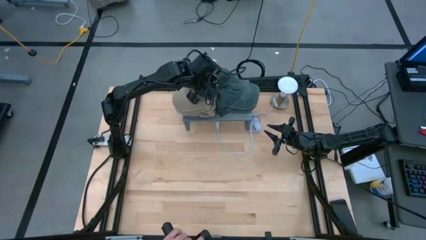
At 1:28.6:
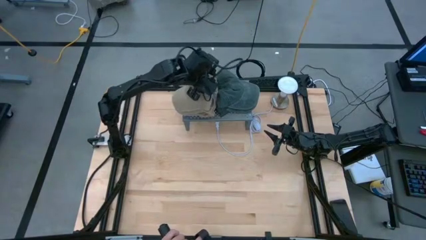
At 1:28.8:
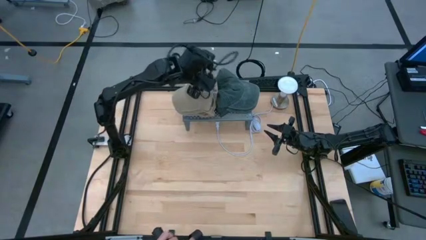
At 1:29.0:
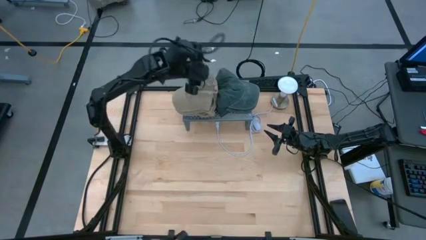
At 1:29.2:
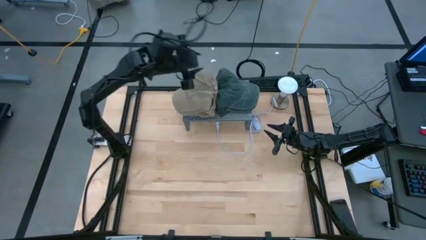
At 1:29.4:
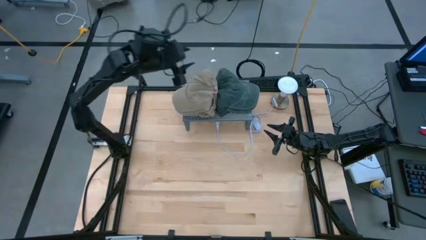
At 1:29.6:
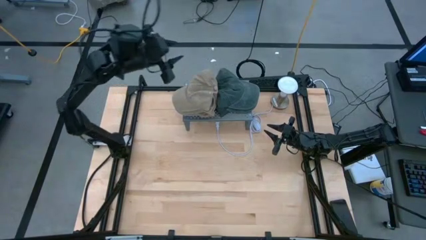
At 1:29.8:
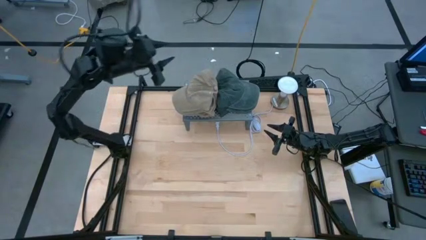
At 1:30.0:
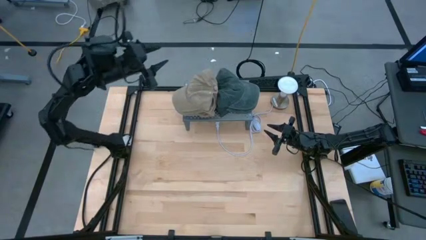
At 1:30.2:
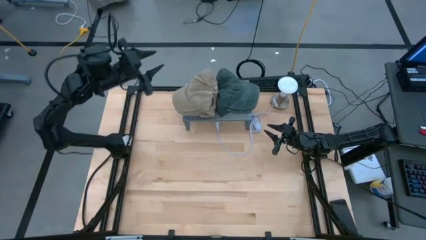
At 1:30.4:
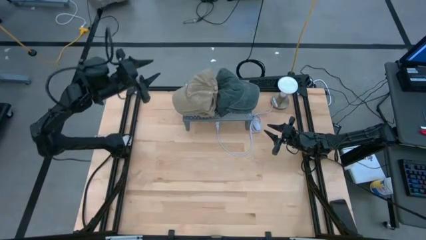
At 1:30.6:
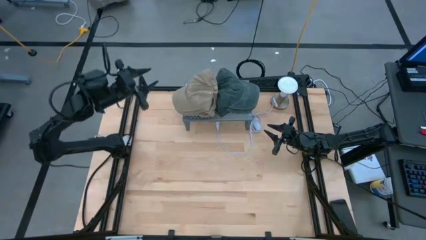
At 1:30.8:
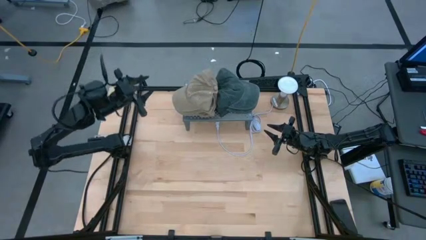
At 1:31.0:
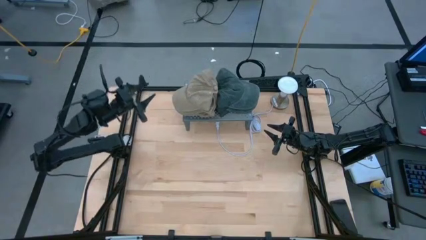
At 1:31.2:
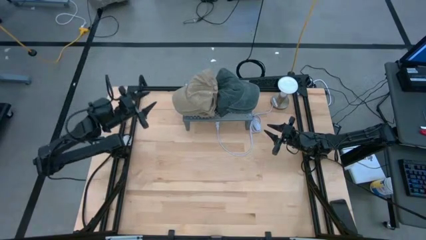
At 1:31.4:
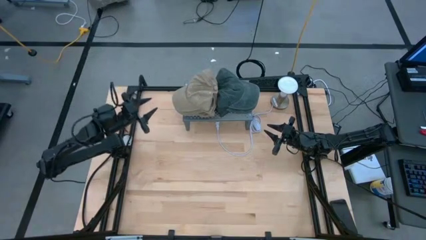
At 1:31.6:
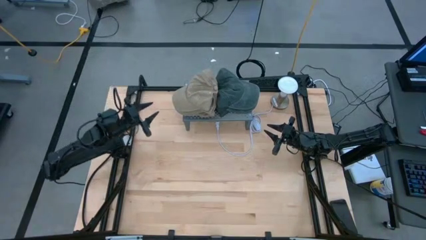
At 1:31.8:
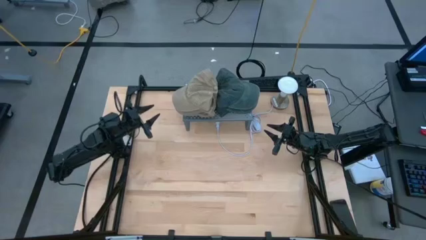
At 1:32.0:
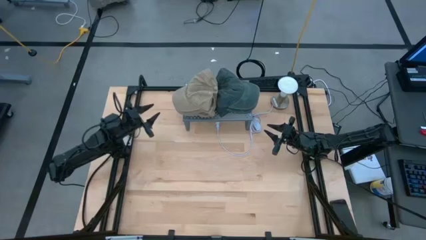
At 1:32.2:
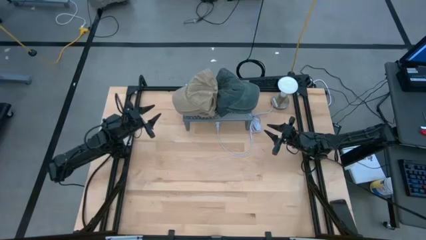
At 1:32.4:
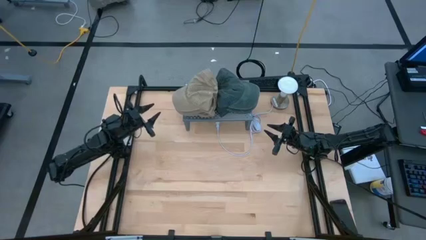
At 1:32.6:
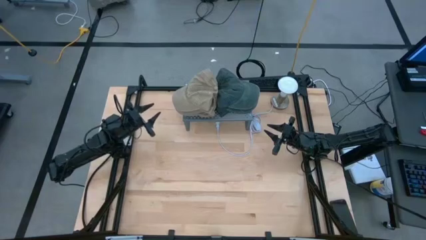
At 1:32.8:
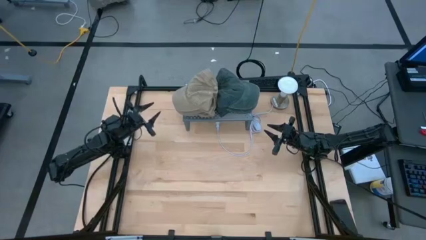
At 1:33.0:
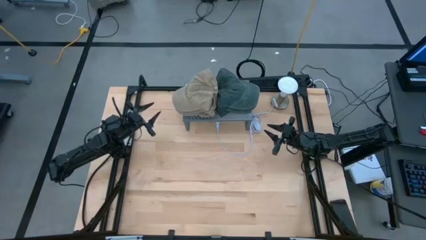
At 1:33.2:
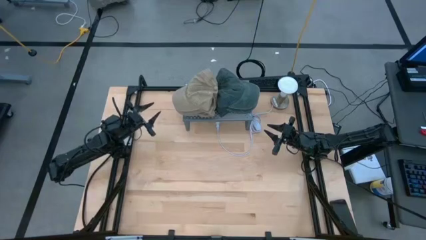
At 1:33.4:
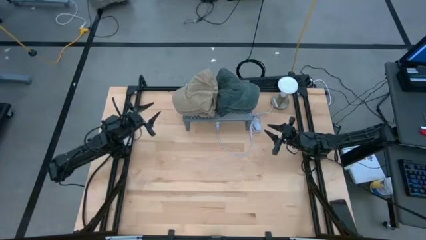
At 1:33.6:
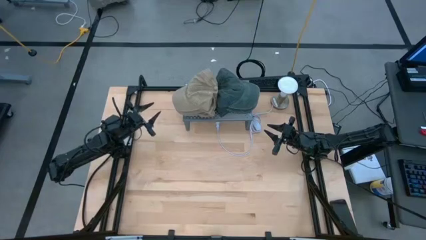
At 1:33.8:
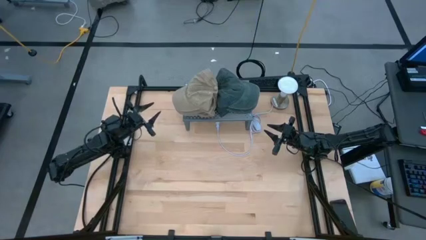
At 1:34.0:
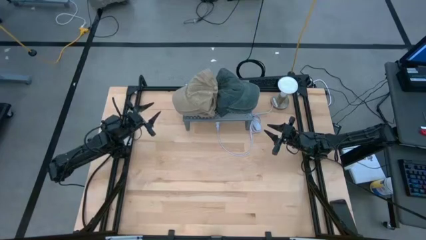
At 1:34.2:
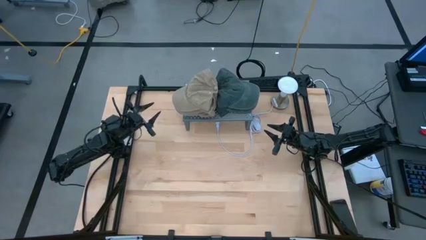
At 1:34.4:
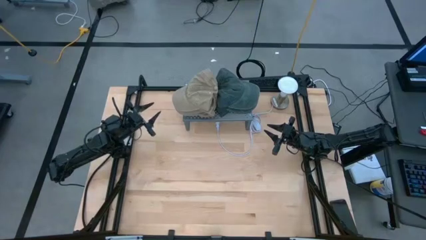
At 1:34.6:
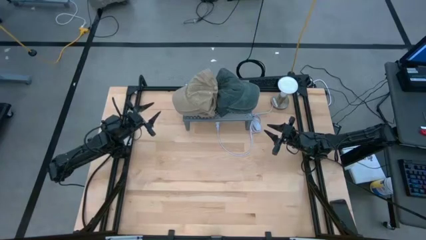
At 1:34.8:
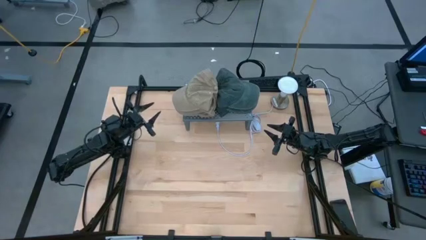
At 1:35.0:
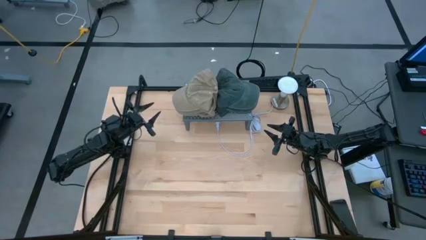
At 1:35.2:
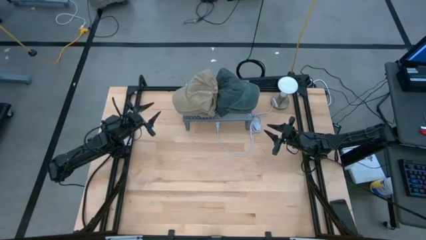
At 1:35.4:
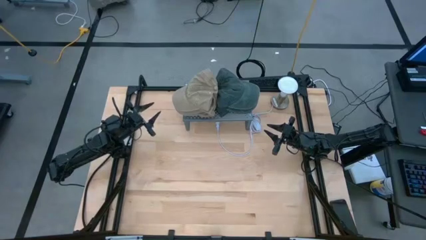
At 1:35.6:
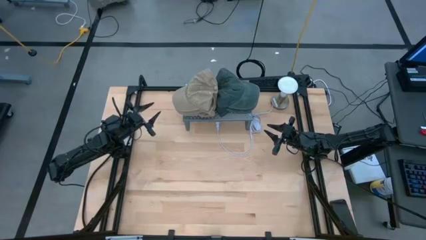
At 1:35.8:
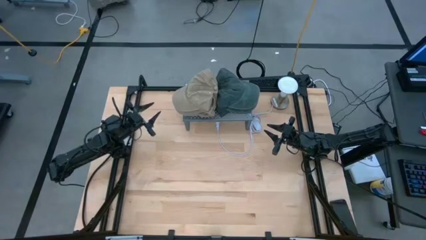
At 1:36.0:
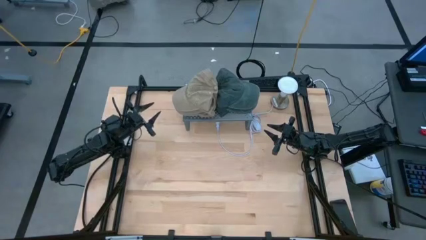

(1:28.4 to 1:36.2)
Task: Pick & Place hat
Return to Home Position

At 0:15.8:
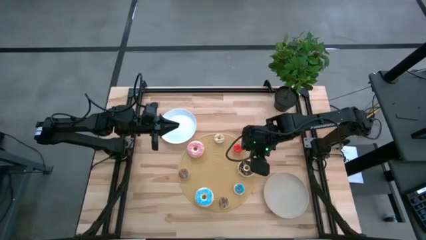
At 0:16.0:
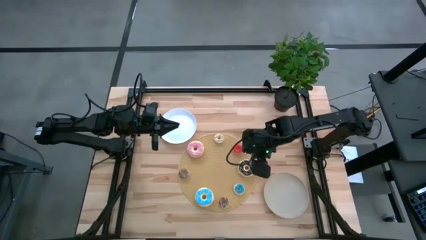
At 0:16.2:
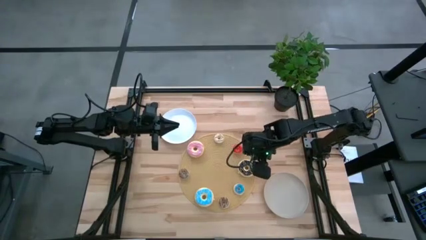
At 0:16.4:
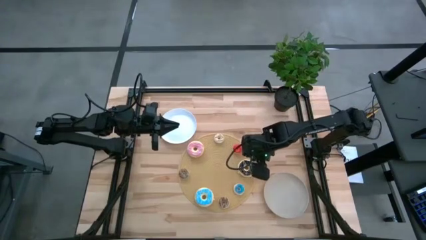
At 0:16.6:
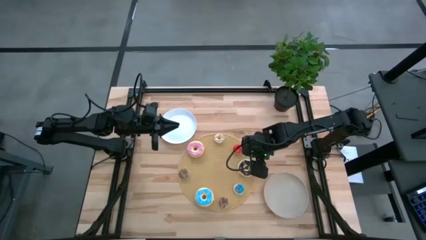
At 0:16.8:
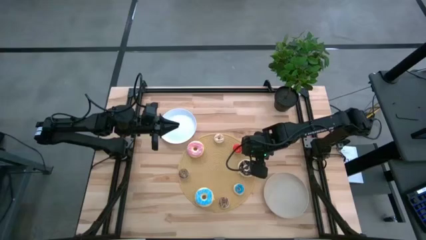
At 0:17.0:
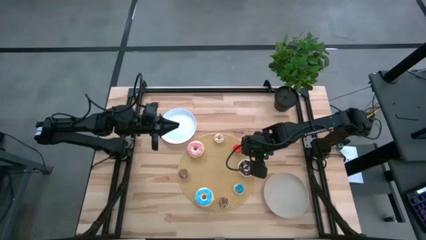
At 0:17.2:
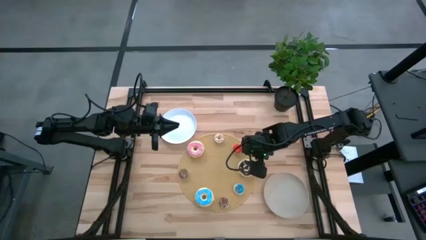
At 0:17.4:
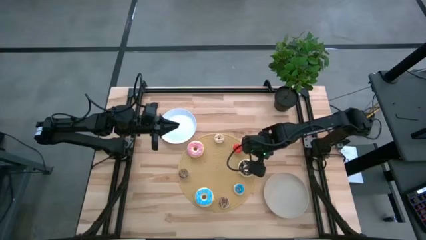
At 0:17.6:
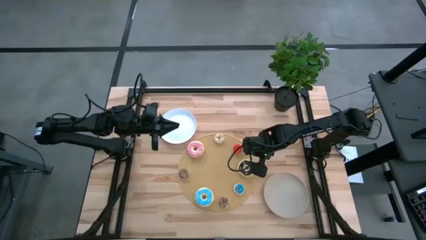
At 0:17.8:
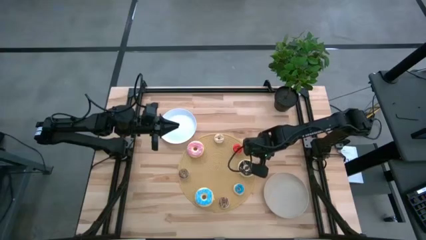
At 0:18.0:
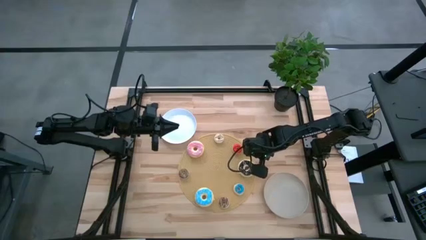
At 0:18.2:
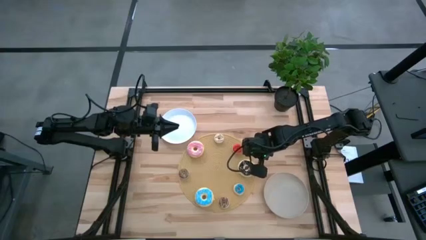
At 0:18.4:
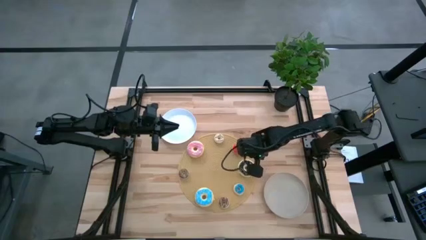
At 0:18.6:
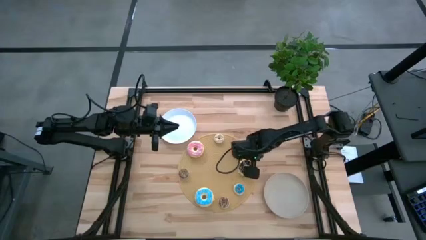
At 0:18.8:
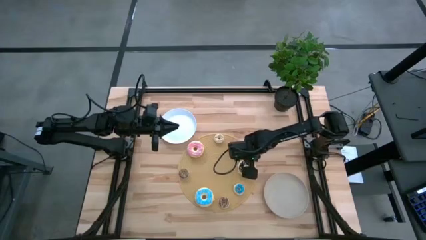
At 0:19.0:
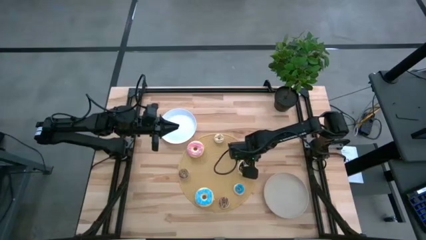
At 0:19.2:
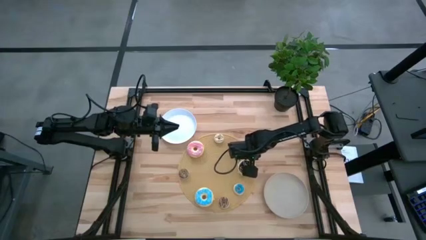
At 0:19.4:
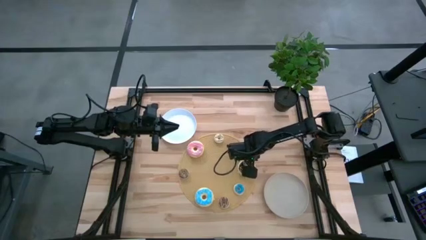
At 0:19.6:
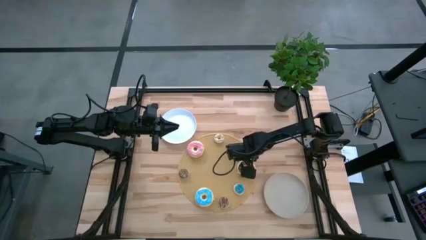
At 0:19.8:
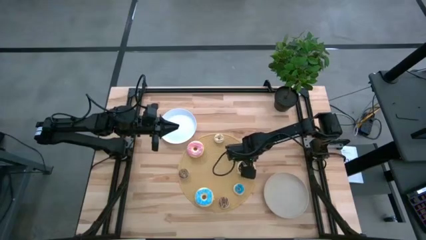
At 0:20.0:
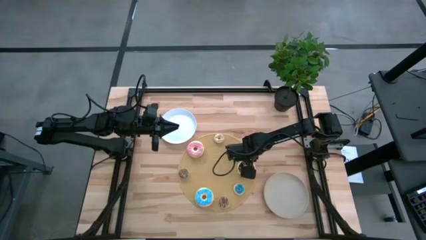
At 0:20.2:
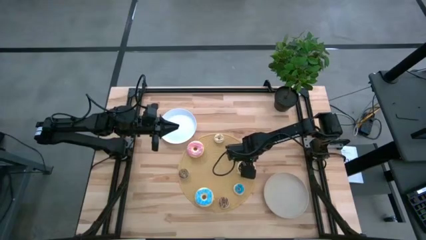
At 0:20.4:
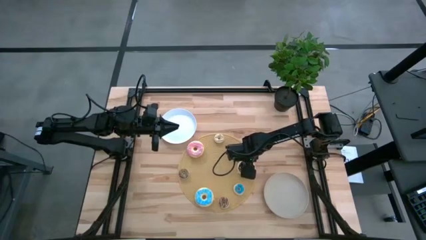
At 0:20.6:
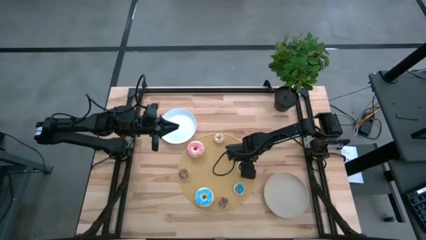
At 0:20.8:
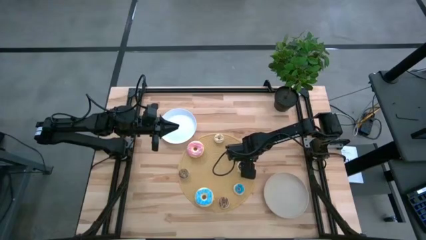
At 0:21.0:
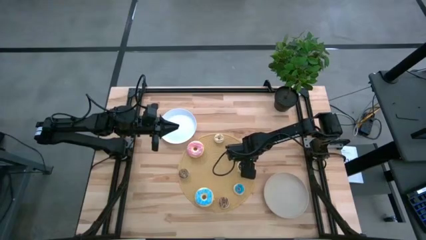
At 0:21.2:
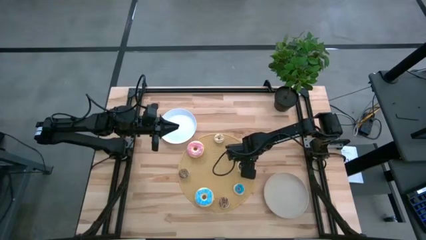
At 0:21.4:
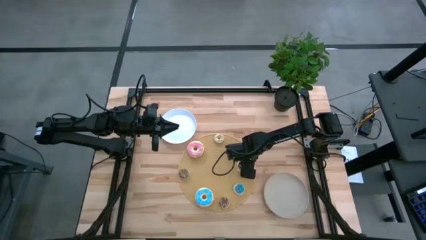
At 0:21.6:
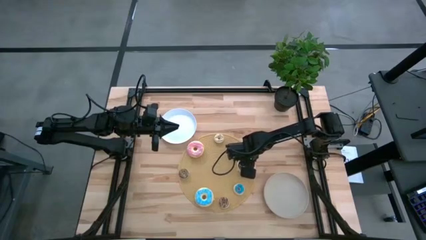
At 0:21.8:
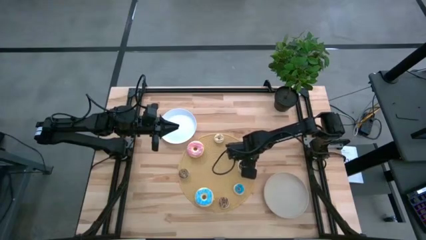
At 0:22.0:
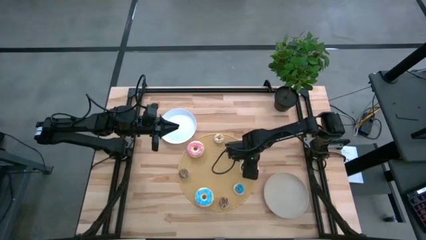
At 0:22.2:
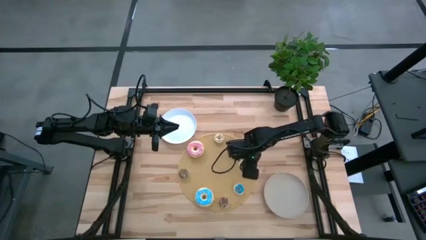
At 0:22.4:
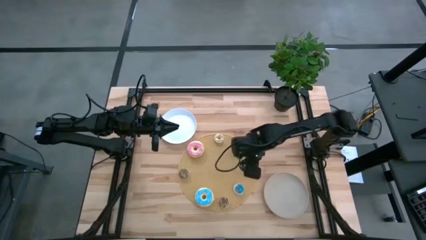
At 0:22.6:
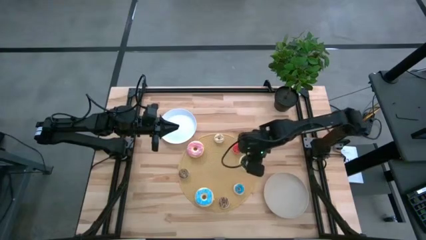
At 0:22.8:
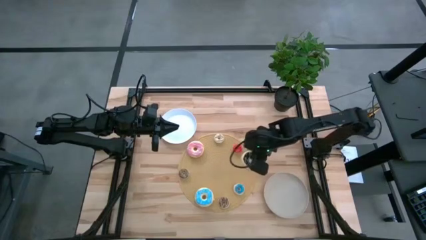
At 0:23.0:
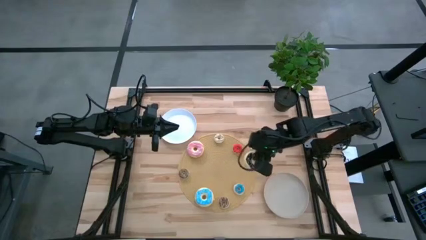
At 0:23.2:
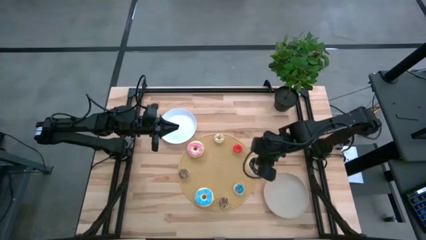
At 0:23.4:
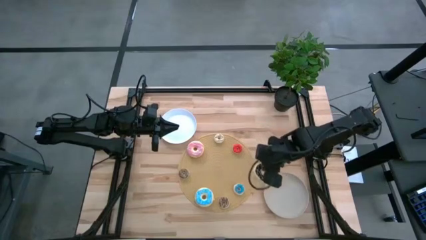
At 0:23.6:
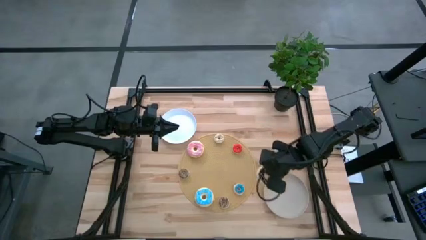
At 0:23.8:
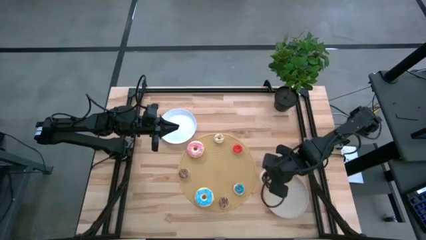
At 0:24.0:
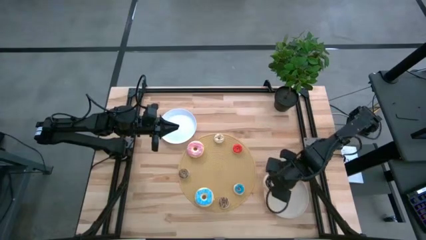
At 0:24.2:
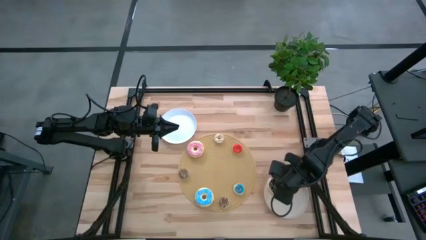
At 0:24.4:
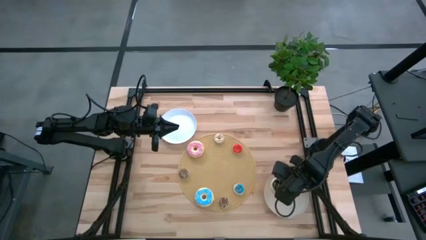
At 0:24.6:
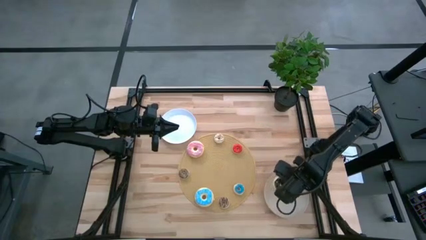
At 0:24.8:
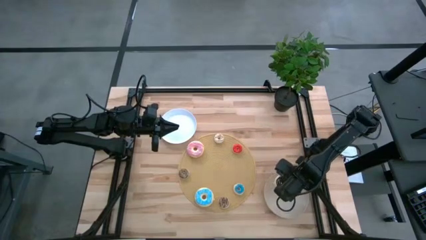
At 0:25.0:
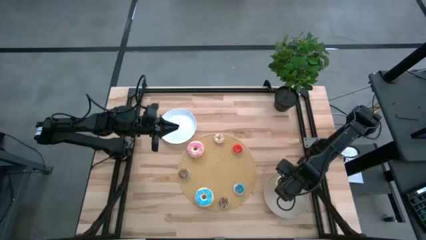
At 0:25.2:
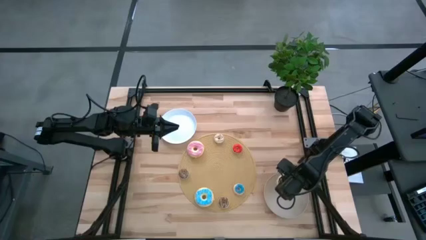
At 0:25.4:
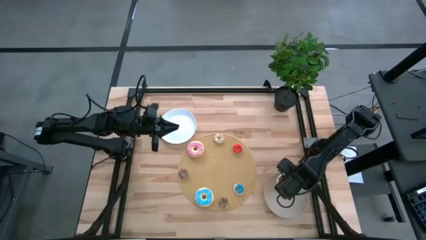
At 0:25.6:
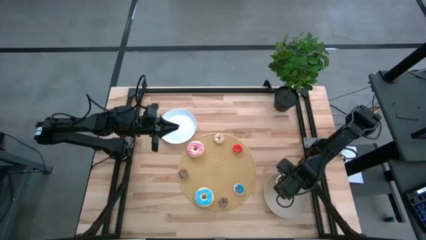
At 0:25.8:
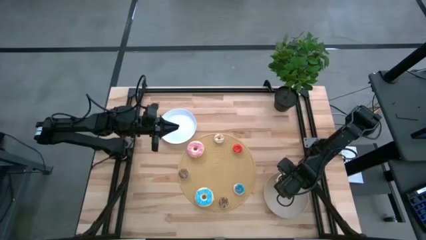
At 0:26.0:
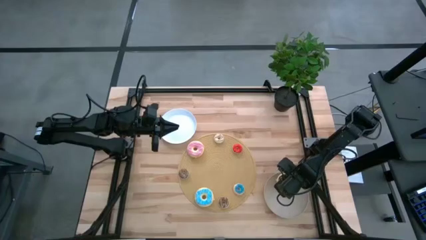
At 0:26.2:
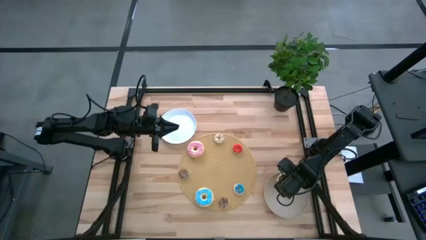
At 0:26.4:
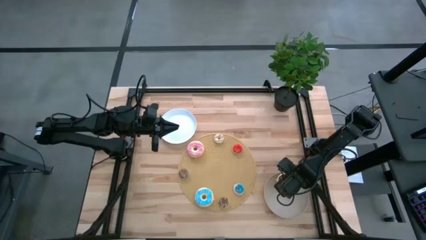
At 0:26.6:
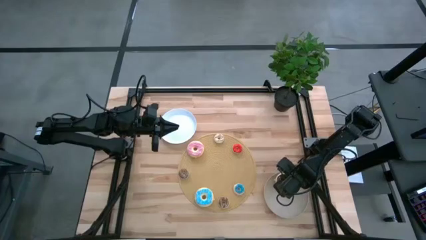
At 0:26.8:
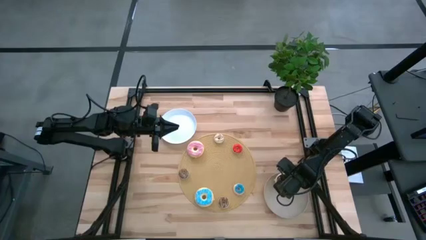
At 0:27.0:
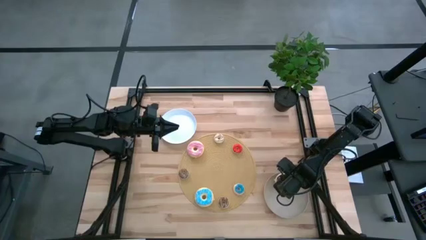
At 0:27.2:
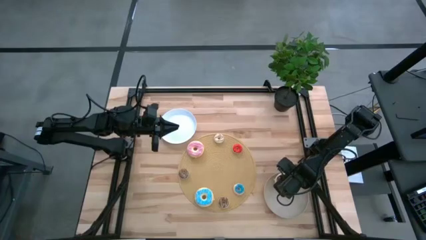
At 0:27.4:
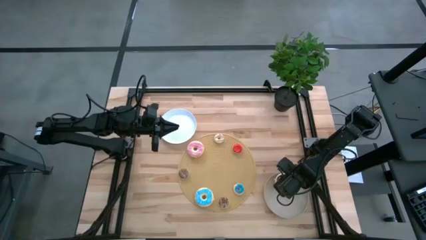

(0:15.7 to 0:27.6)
Task: Pick & Place donuts
Put the large black donut into the gray plate
